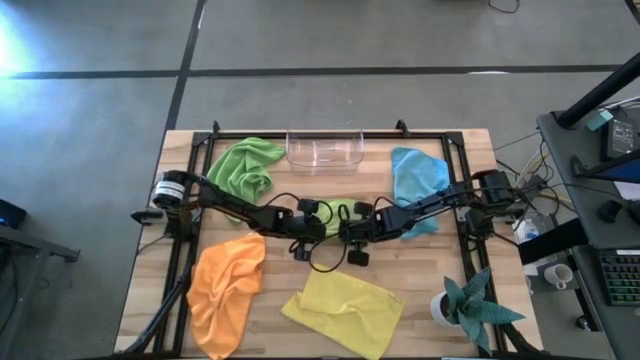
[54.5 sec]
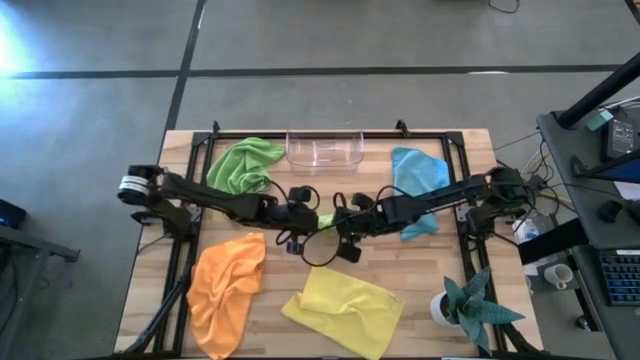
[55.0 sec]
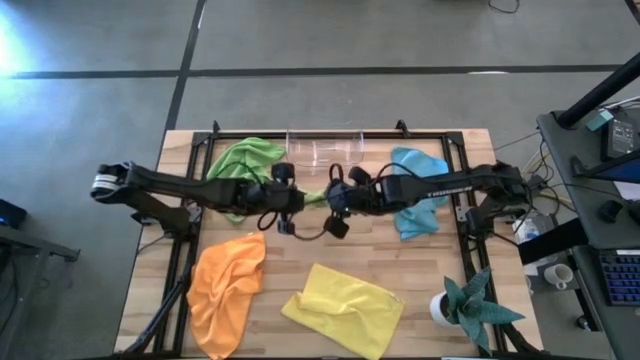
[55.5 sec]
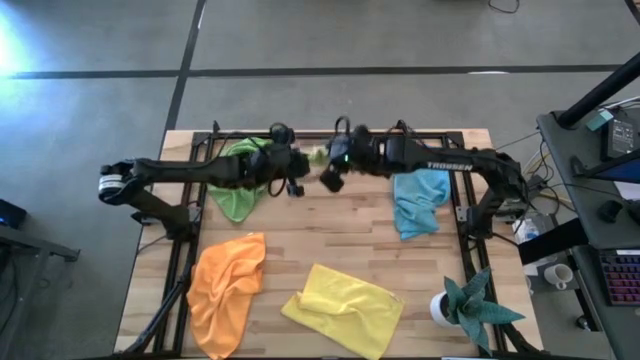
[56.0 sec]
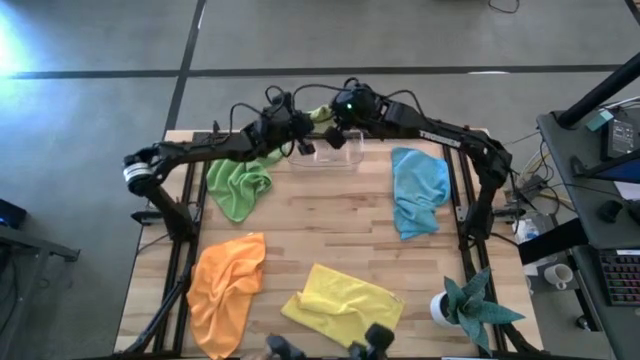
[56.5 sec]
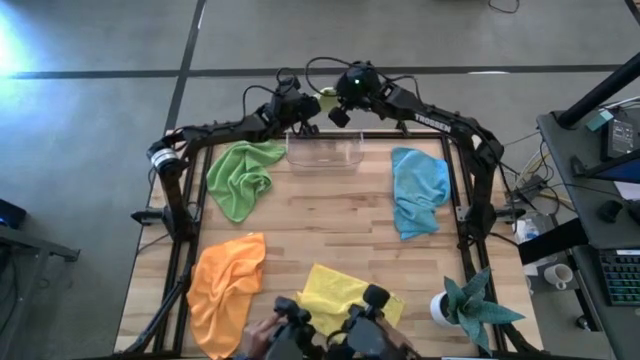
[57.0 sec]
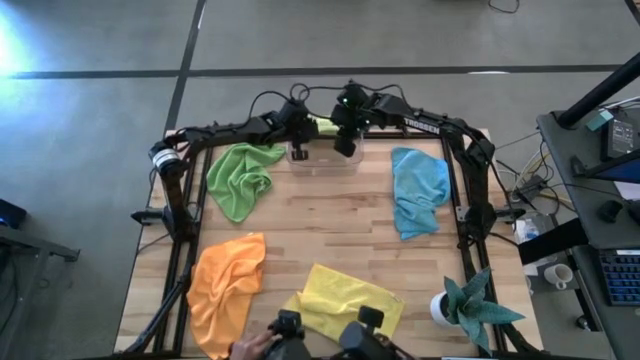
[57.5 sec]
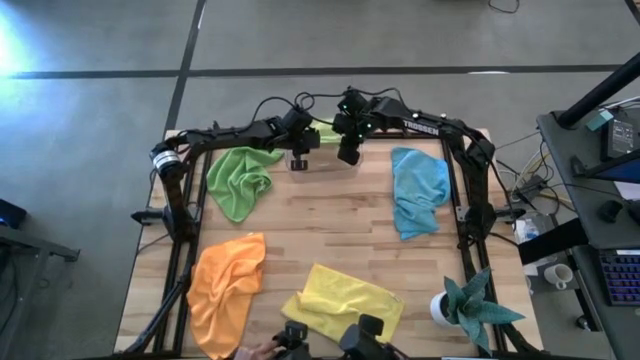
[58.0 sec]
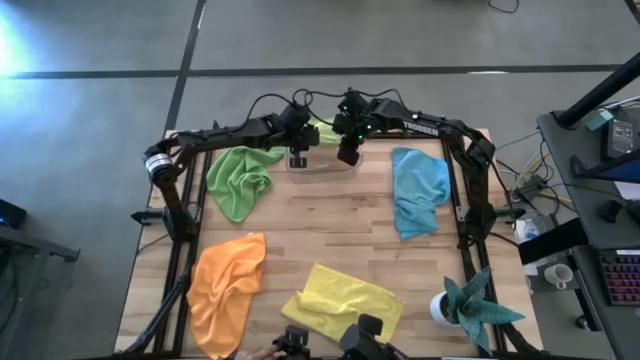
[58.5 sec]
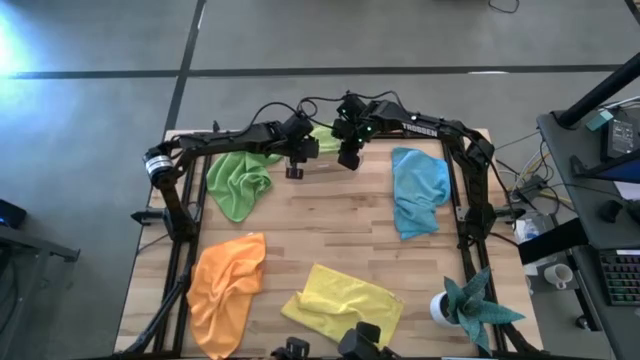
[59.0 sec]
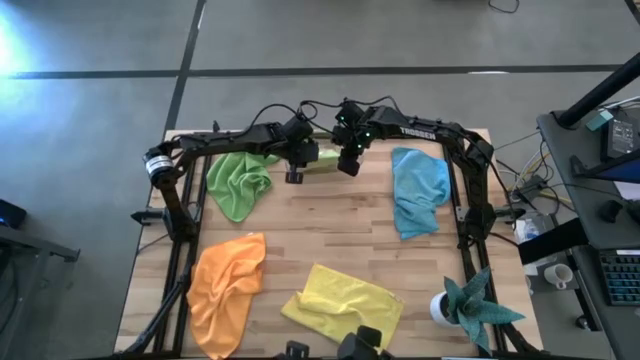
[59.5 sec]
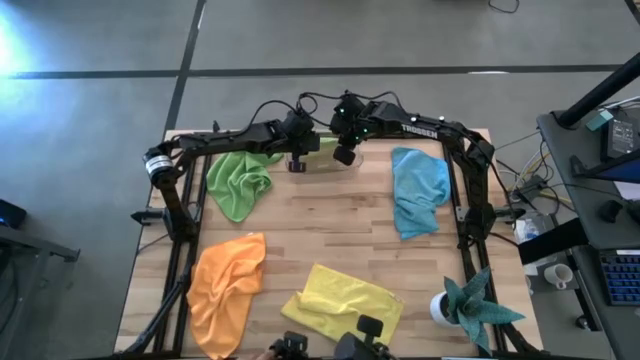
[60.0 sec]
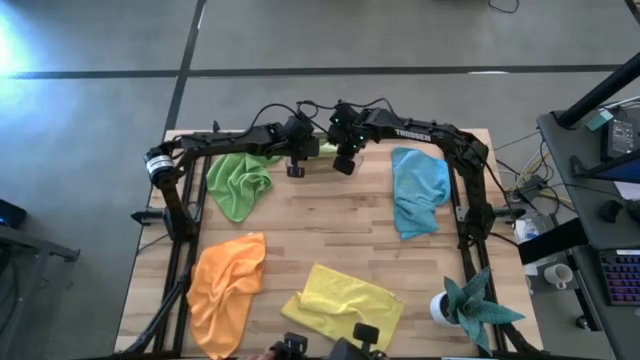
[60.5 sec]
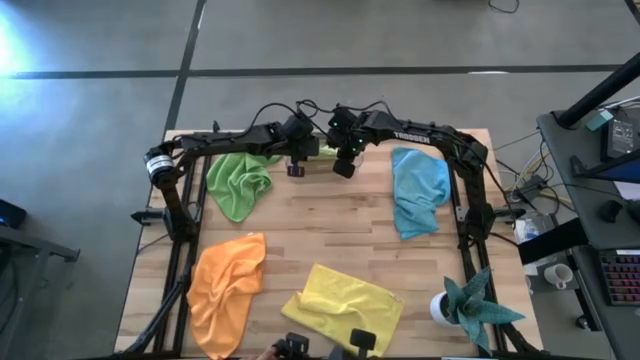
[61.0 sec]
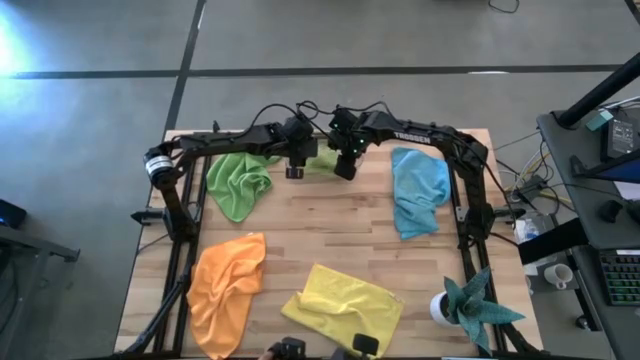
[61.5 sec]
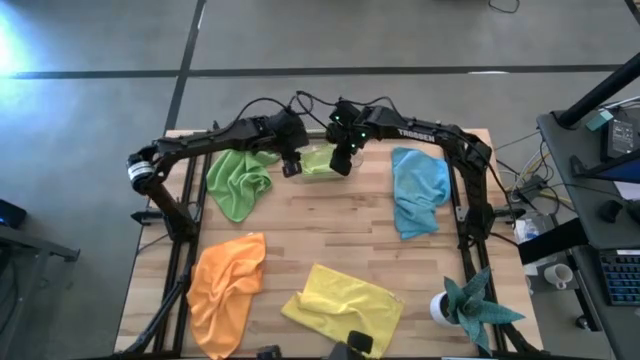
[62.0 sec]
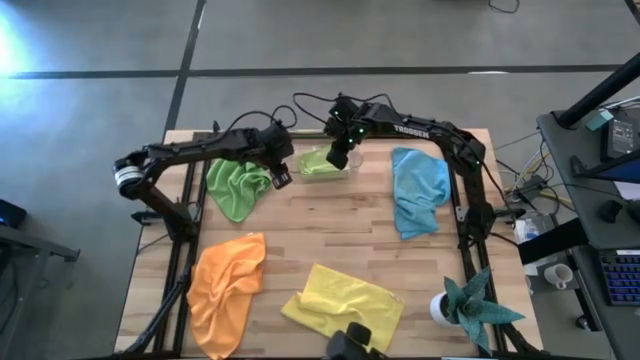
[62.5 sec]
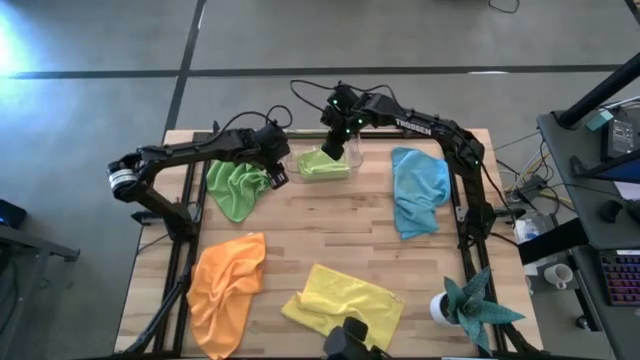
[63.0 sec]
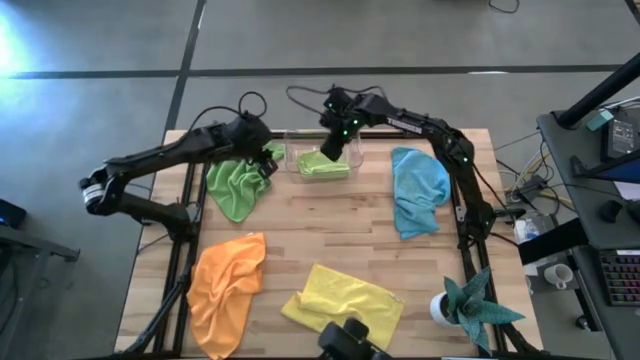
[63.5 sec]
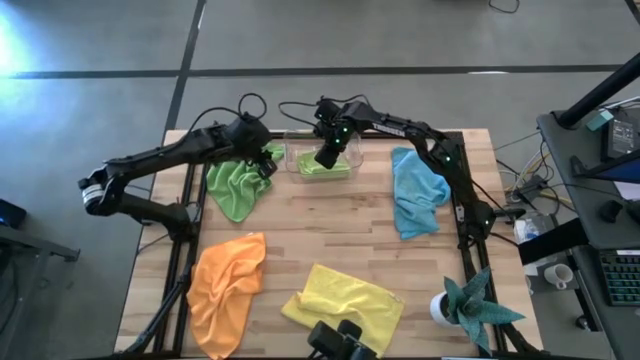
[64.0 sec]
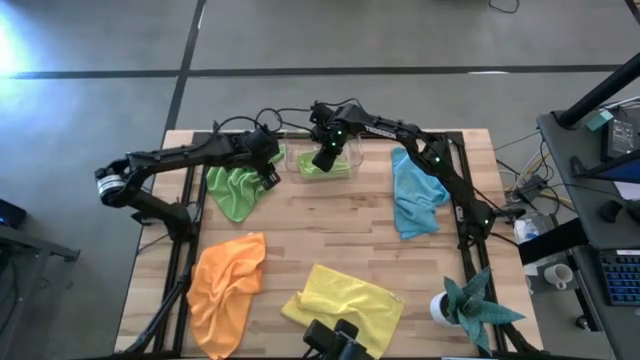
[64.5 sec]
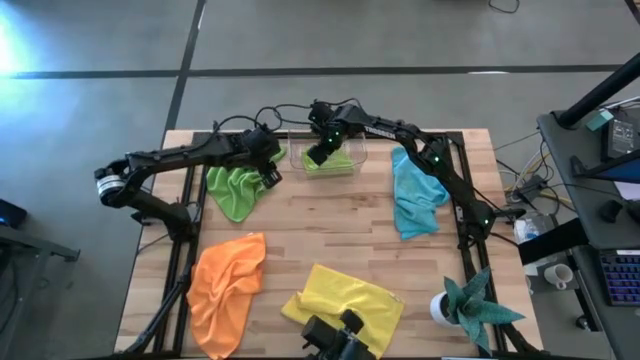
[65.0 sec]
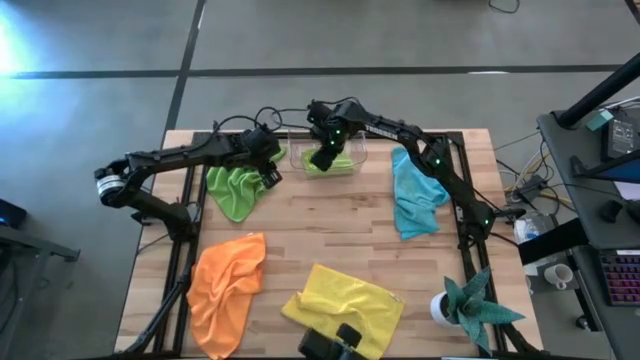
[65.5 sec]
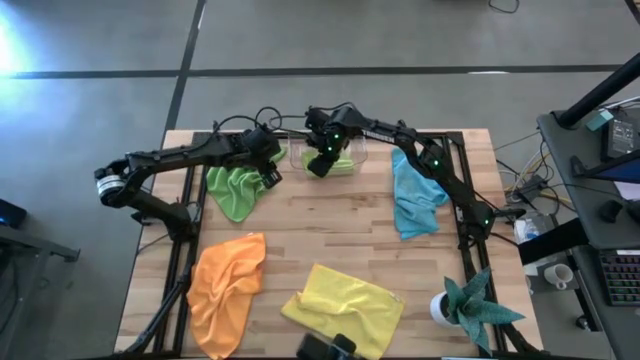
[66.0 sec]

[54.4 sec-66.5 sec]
Task: Fold microfiber towels
Put the green microfiber towel into the transparent bin

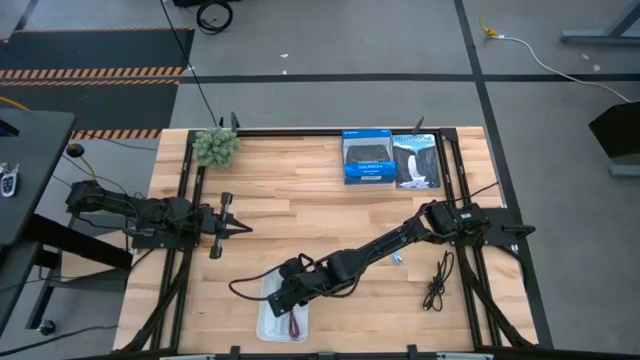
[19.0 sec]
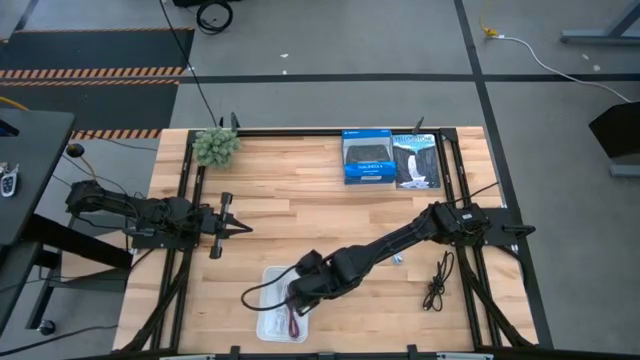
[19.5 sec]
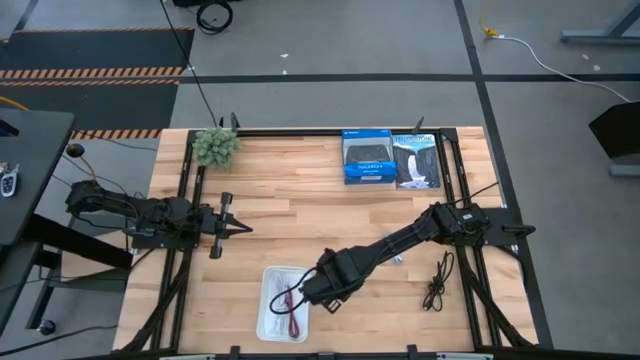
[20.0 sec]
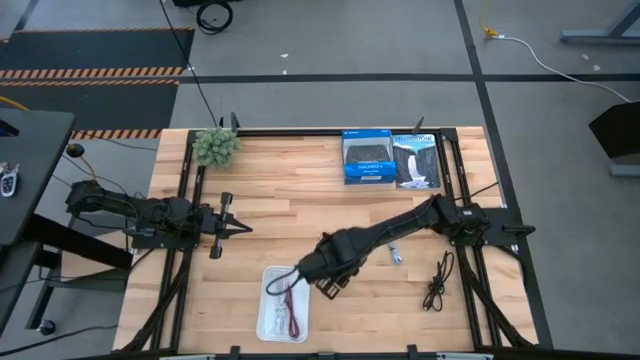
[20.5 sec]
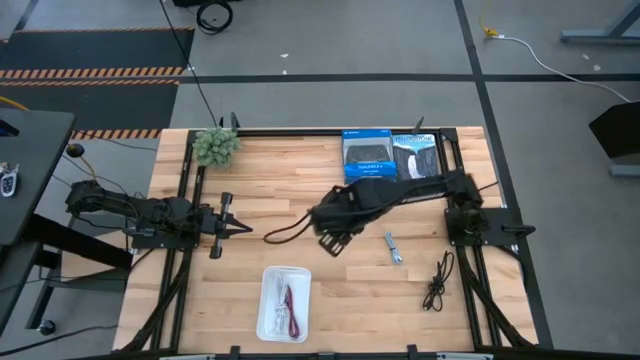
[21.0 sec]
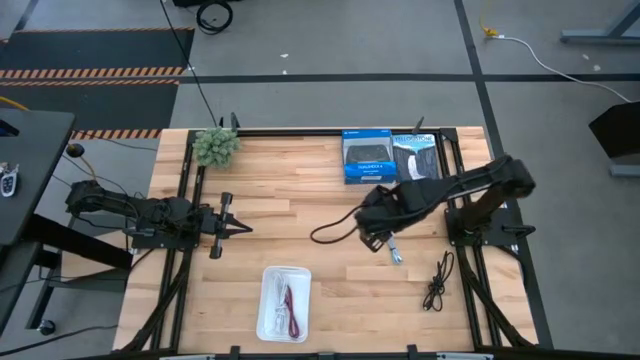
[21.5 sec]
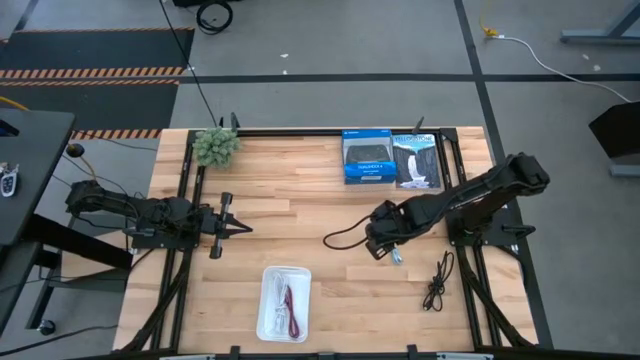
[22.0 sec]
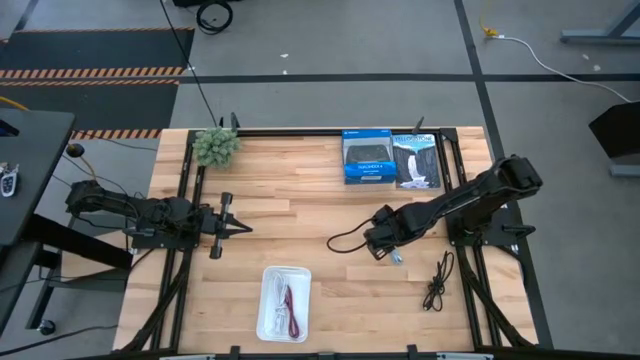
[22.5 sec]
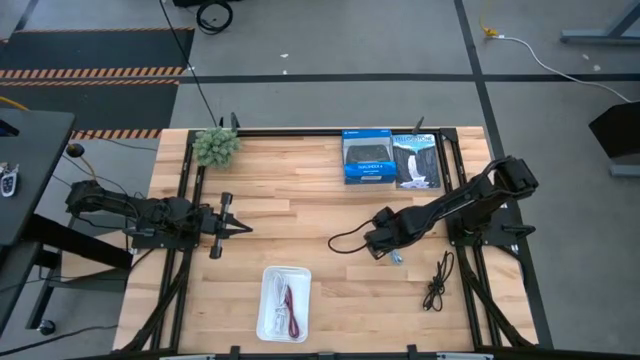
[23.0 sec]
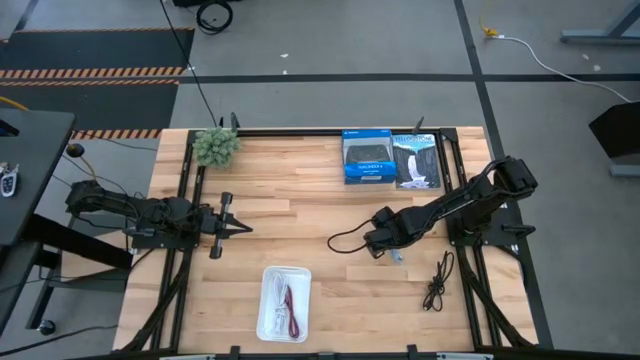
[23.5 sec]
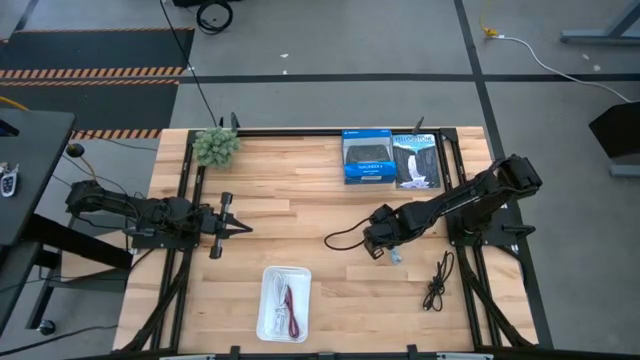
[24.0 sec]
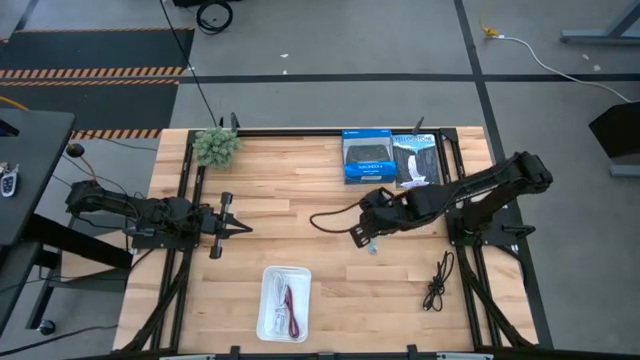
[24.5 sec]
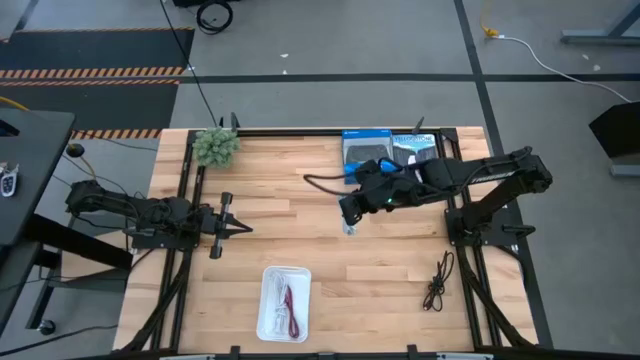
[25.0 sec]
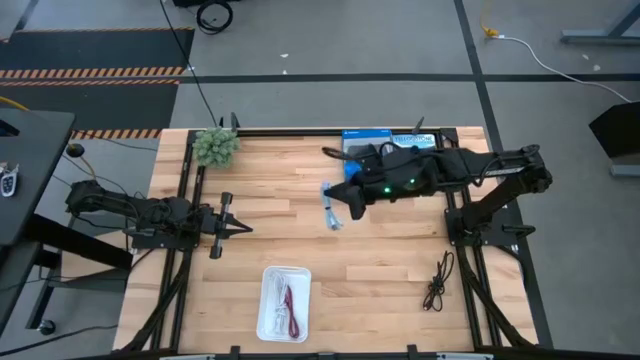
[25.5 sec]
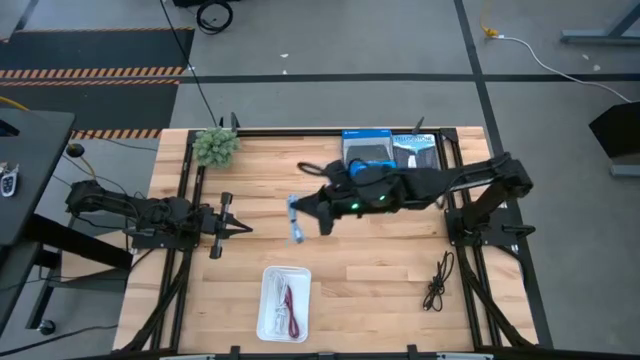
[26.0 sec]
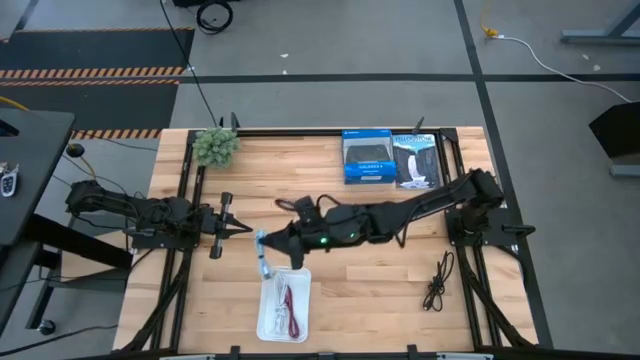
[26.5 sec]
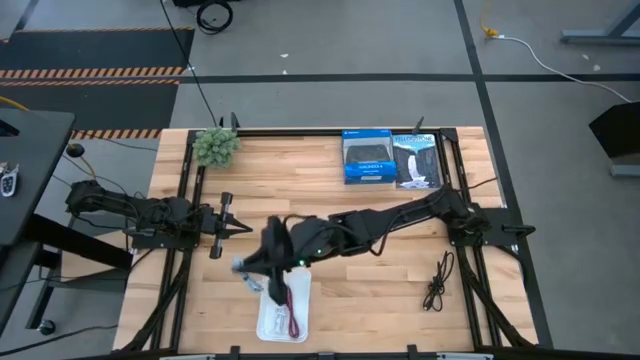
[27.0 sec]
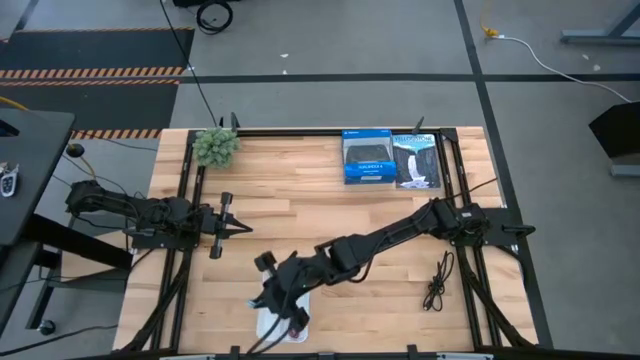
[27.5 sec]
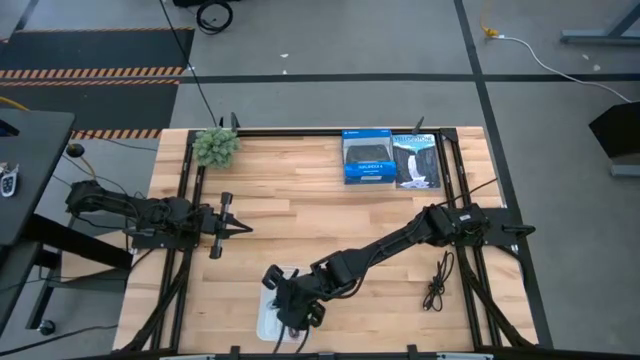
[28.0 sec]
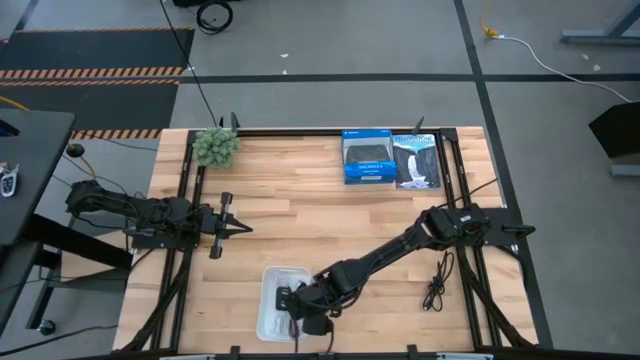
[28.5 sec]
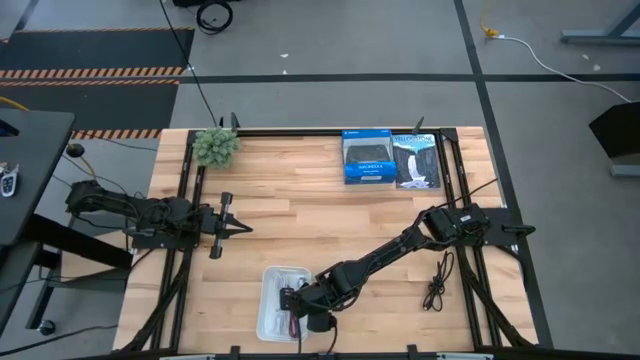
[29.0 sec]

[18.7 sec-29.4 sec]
Task: Pick and place USB-C Cables
Put the blue charger cable into the bin
